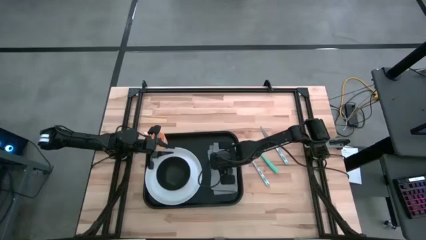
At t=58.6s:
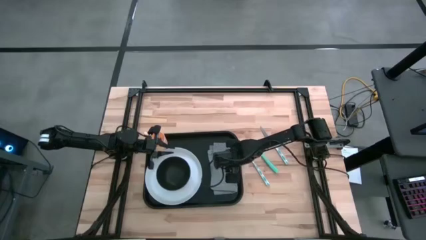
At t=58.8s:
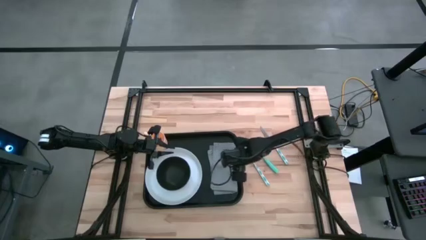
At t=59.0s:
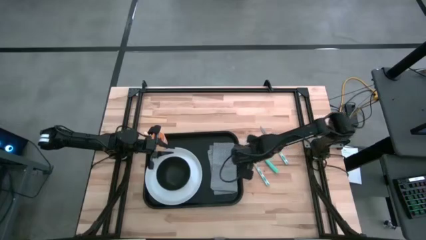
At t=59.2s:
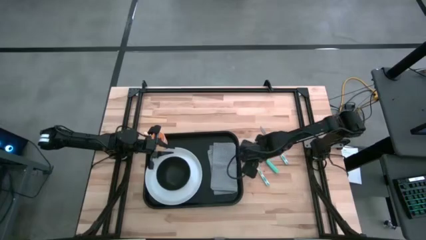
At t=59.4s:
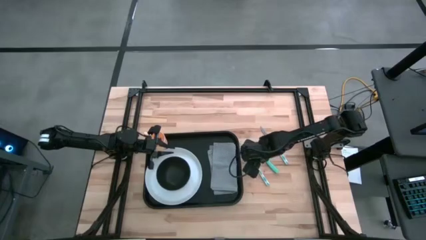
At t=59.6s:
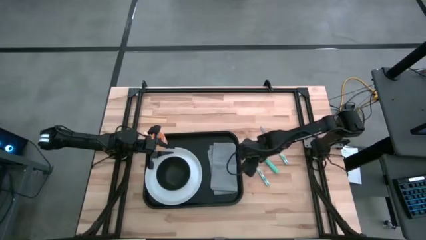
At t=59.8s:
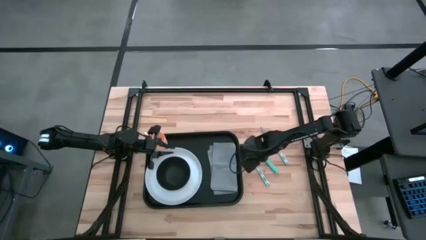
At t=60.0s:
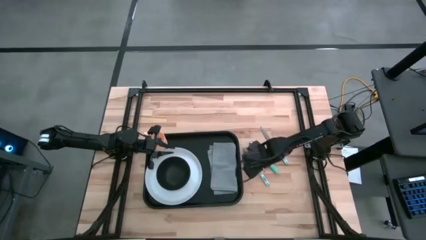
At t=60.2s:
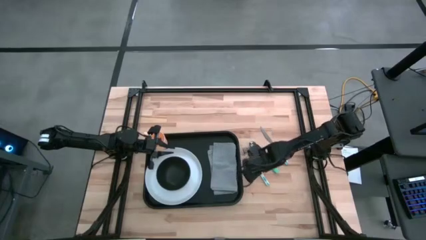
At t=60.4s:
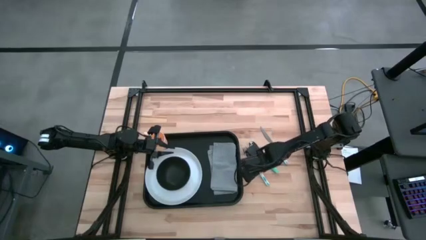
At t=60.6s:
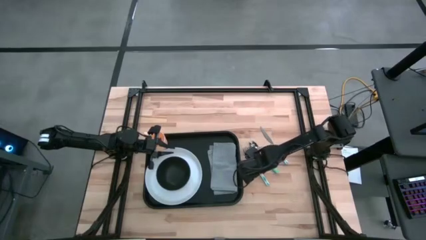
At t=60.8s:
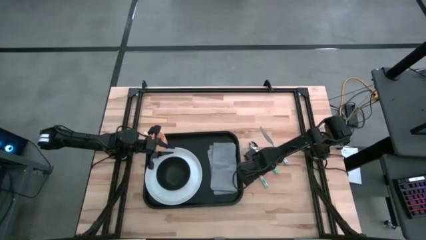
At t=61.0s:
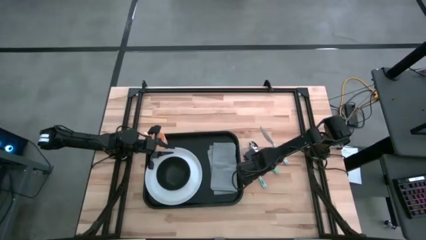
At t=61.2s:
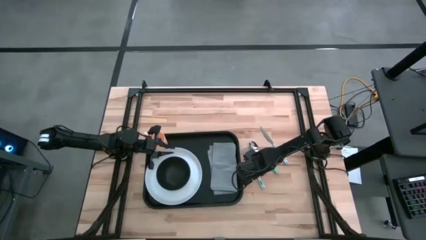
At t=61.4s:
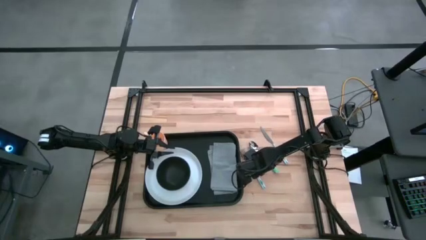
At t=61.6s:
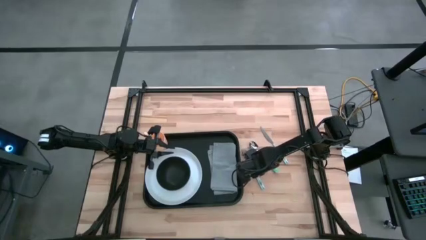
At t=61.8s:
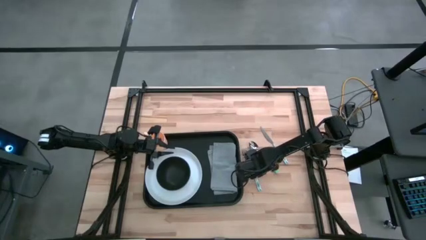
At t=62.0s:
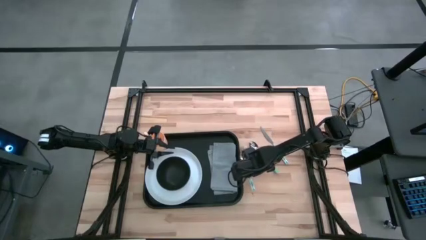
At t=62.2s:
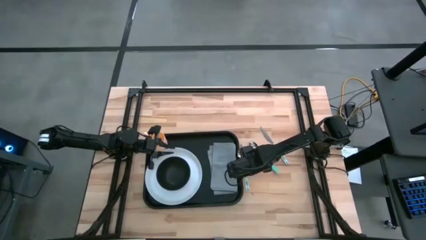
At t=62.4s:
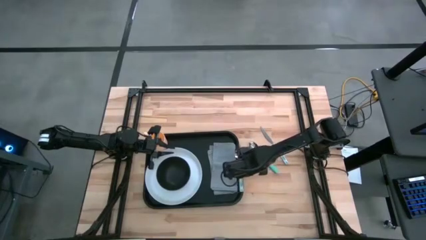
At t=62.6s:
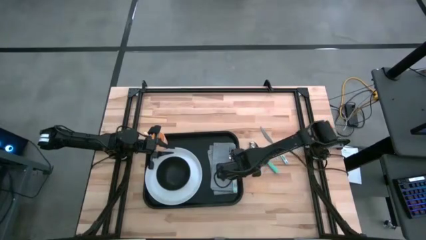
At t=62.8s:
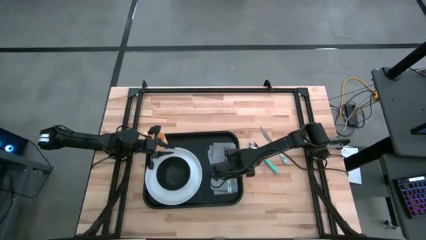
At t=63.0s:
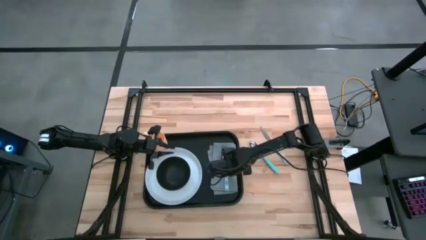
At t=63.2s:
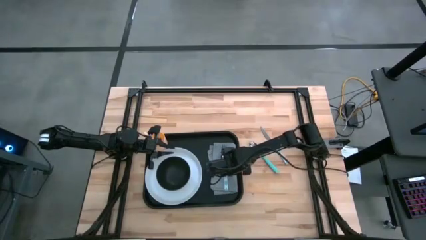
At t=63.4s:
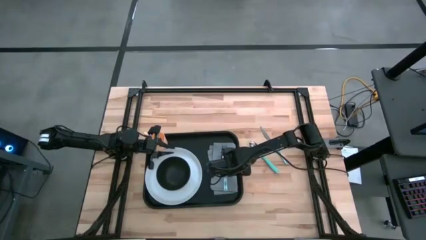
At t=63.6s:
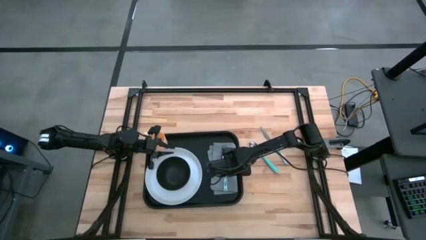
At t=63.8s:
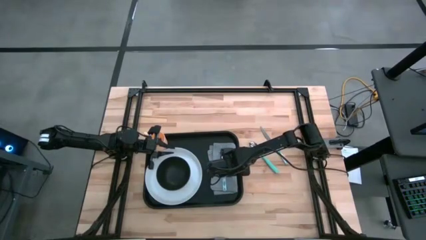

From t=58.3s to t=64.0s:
Task: Set up tray
Put the white fork on the gray napkin

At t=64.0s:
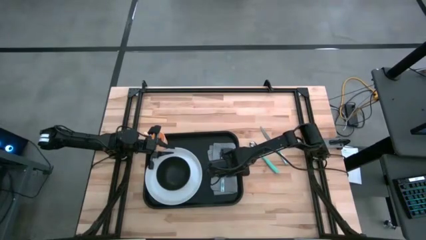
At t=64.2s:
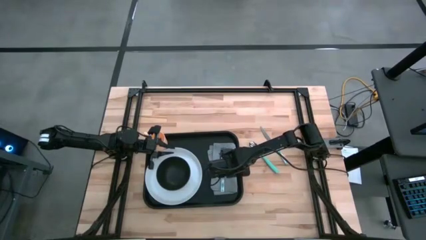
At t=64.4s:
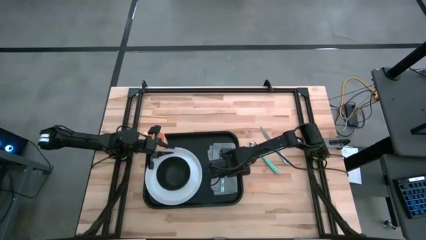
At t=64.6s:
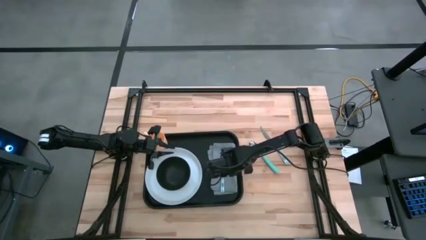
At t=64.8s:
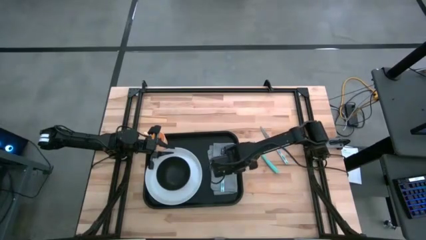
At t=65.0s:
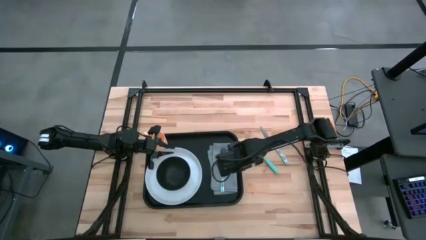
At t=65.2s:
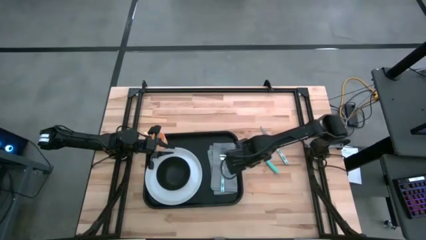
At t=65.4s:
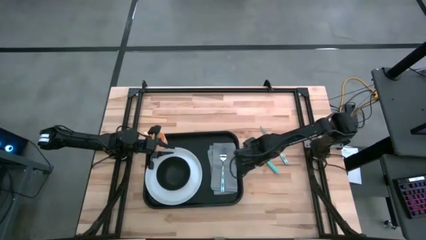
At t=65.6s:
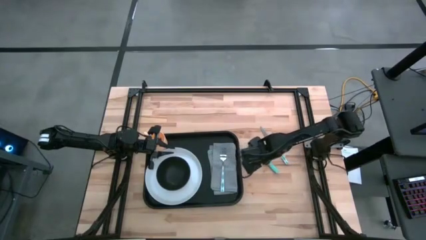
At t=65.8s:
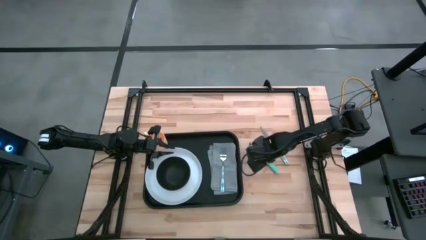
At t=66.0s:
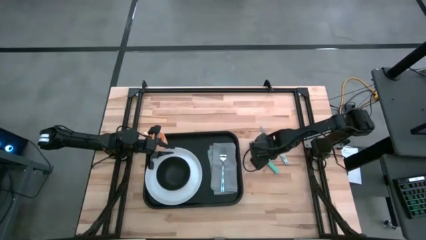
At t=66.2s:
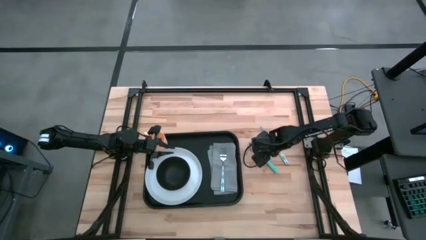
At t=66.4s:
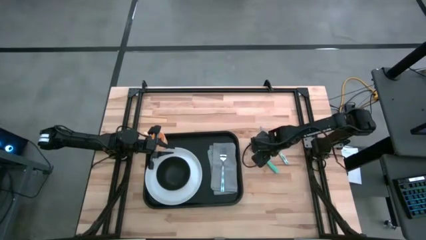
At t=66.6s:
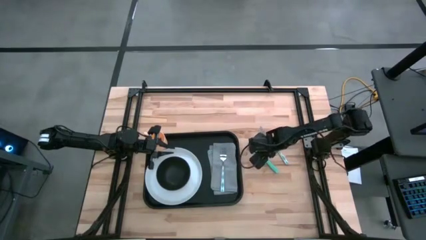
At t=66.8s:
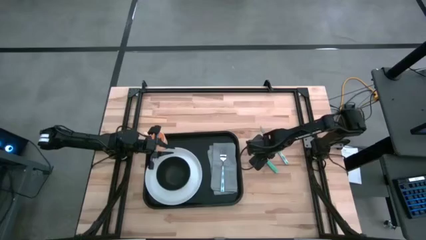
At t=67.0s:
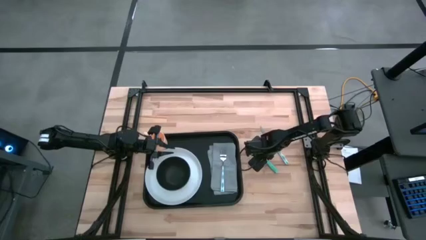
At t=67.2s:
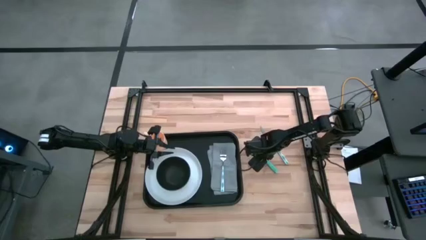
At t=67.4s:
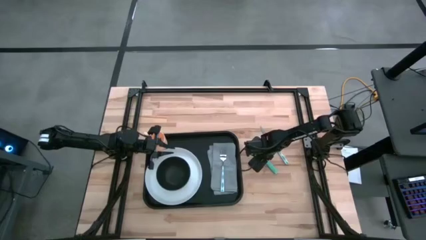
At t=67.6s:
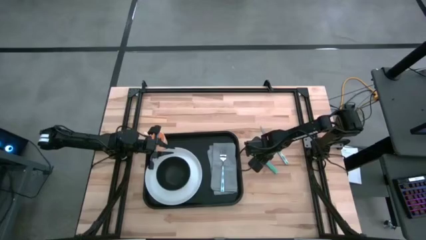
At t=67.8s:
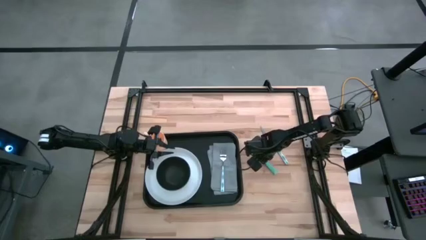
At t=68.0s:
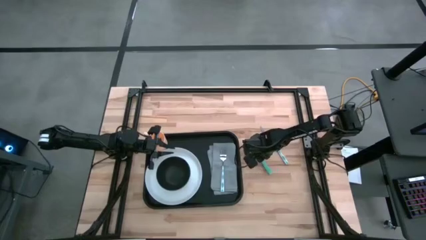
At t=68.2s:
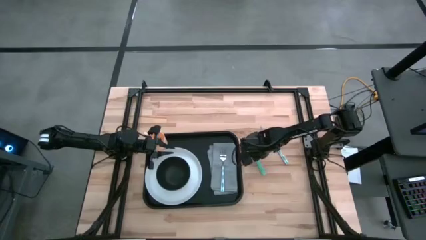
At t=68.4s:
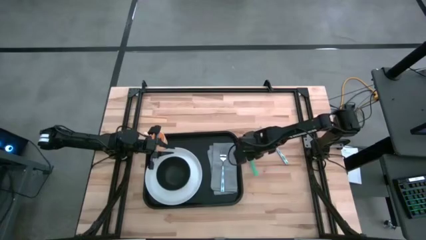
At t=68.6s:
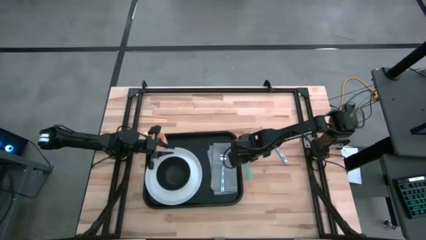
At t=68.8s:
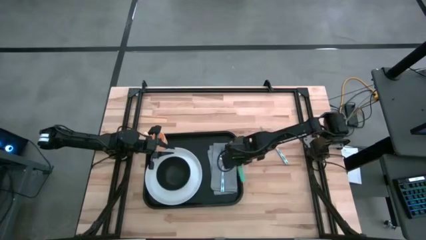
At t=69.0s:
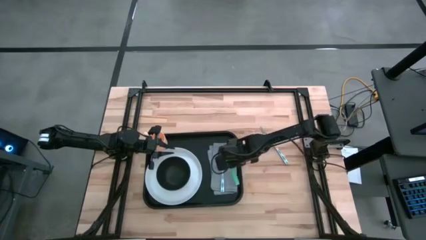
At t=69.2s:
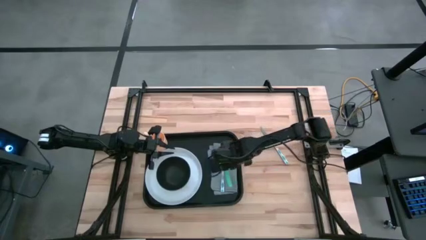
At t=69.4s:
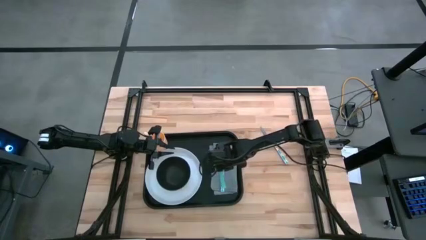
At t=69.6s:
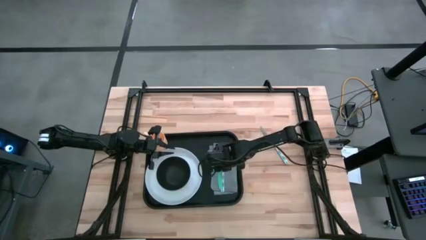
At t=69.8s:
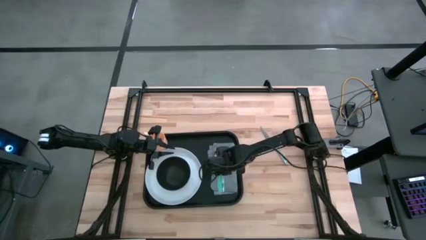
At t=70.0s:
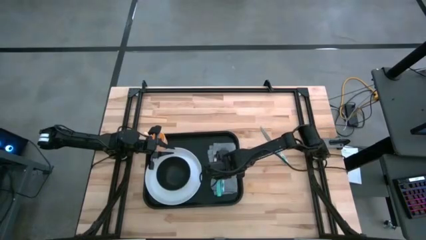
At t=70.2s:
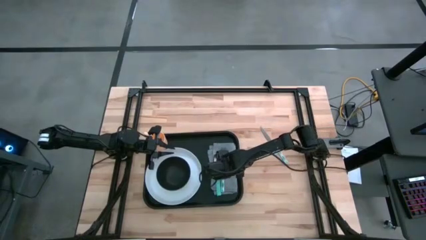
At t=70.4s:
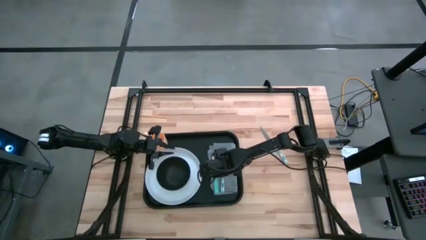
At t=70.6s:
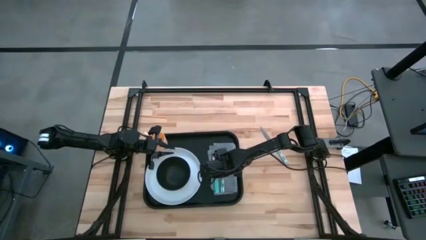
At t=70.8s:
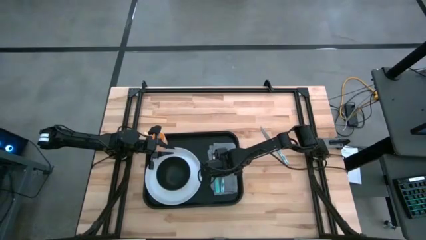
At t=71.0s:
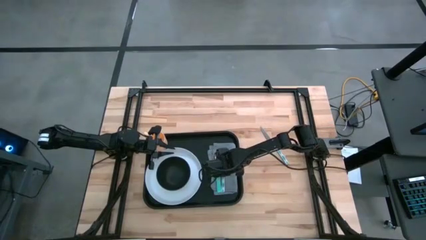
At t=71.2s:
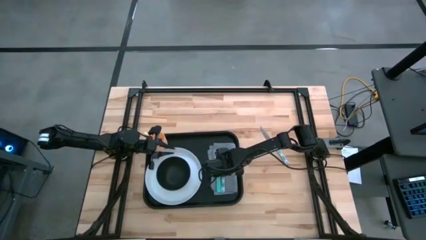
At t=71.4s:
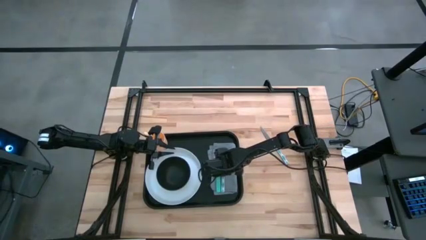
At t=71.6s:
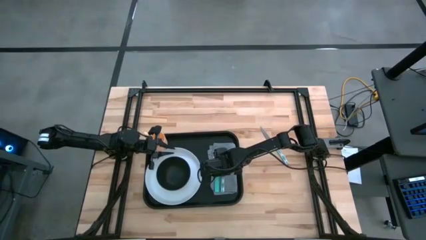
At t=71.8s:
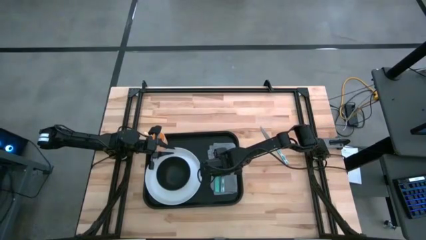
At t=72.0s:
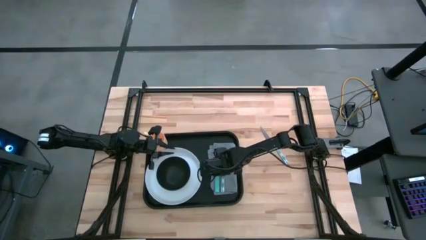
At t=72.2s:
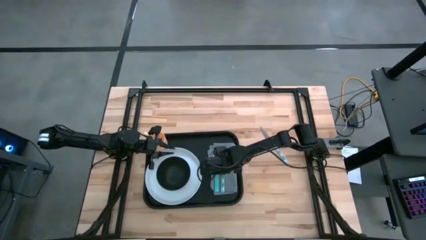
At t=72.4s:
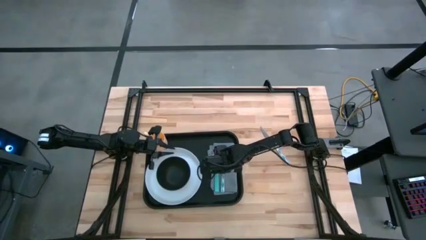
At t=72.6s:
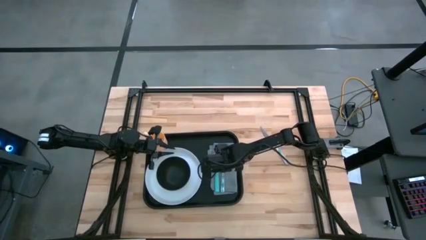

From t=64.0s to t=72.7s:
Put the green spoon on the gray napkin to the left of the white fork
